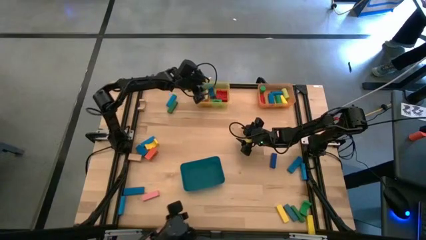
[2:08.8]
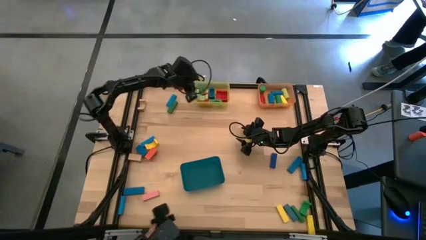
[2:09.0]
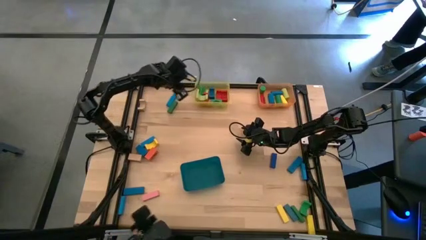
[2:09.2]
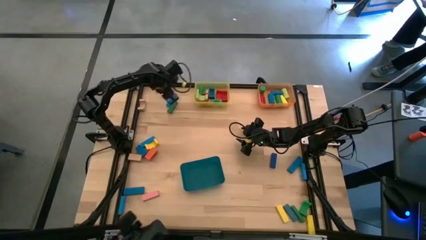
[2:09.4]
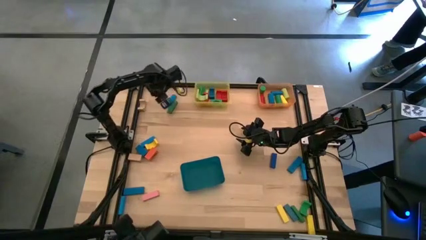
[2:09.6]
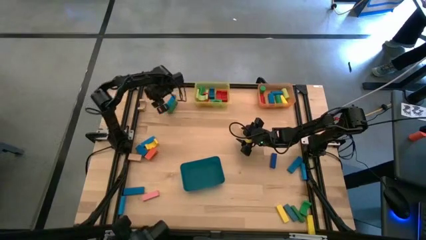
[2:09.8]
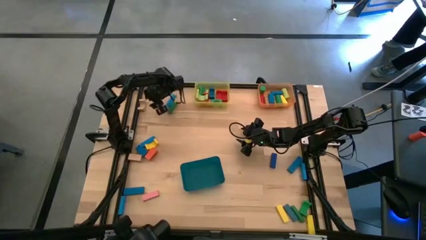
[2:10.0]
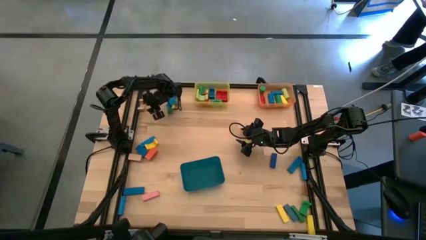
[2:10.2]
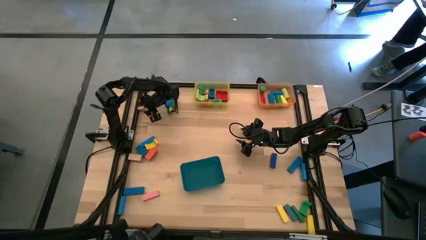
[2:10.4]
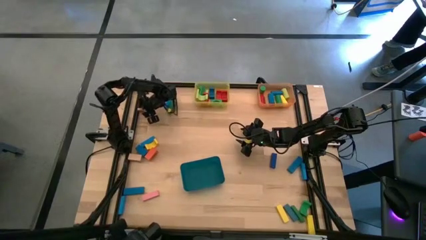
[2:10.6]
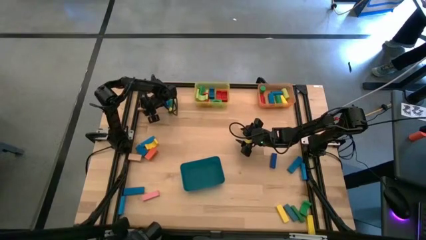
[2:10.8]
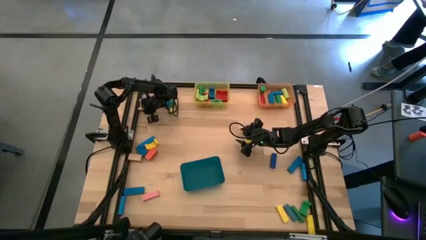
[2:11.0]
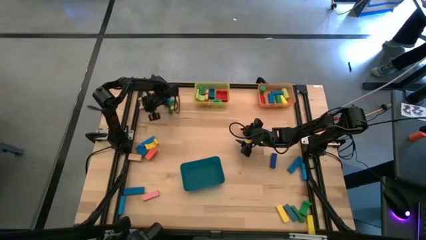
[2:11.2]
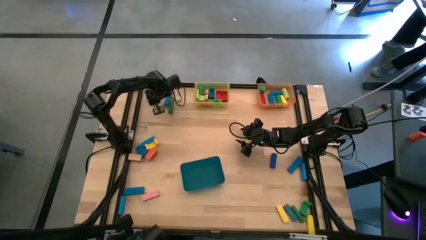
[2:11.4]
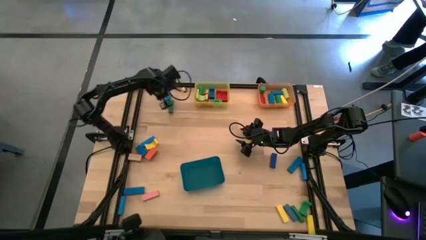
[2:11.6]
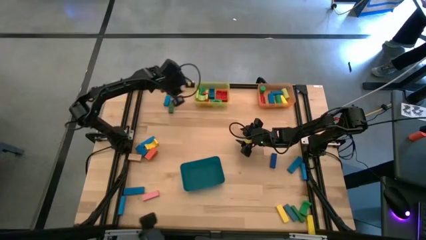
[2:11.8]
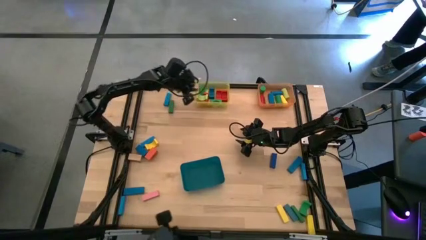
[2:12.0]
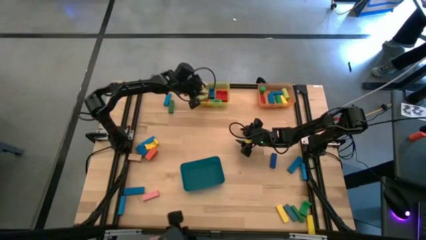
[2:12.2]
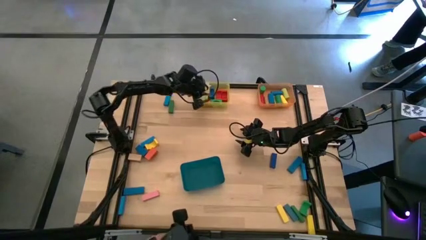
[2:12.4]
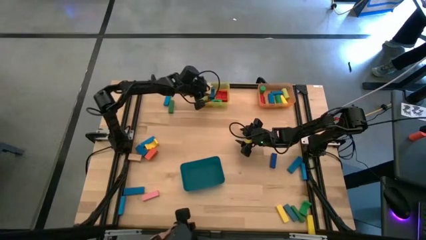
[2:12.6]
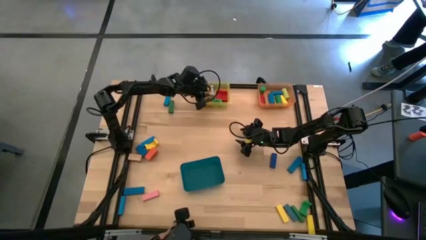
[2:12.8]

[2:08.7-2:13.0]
Task: Sort blocks by size
Put the brown arch block into the yellow bin

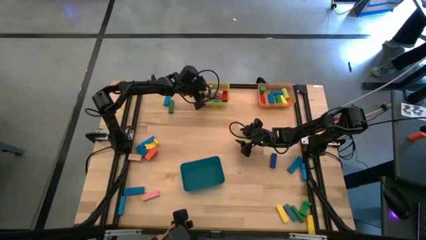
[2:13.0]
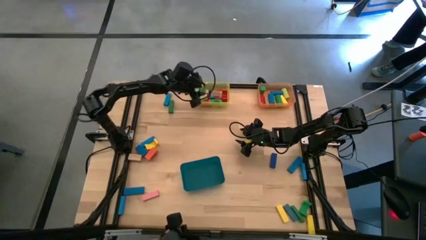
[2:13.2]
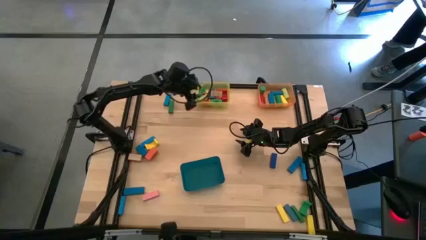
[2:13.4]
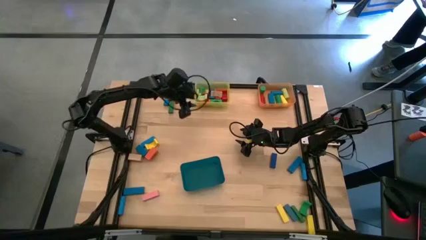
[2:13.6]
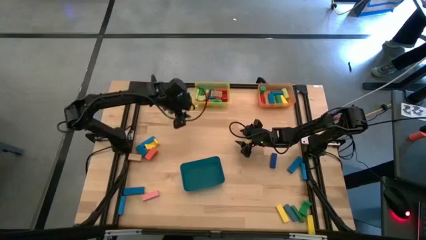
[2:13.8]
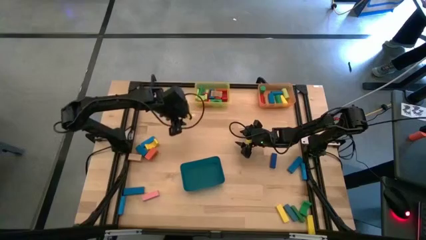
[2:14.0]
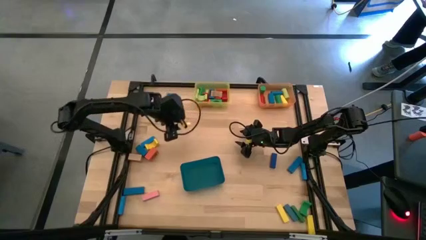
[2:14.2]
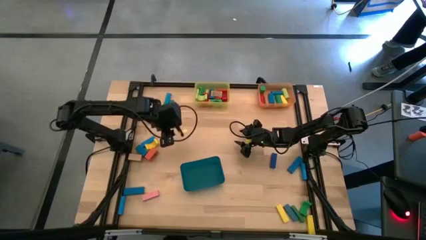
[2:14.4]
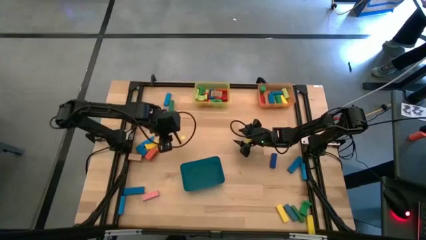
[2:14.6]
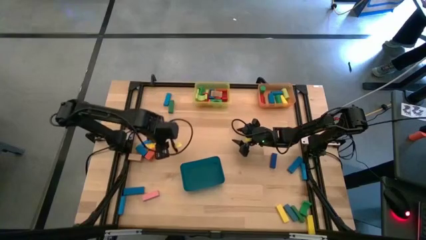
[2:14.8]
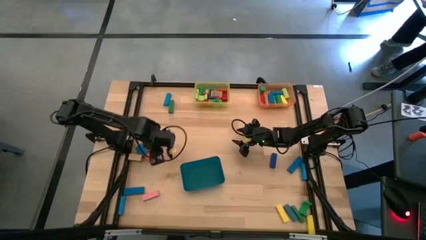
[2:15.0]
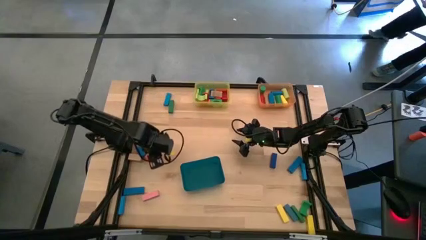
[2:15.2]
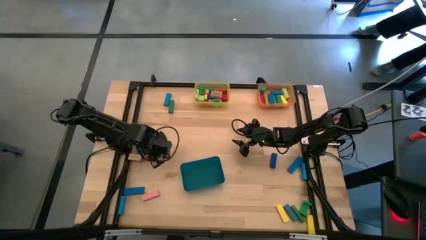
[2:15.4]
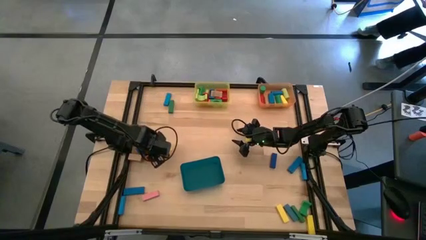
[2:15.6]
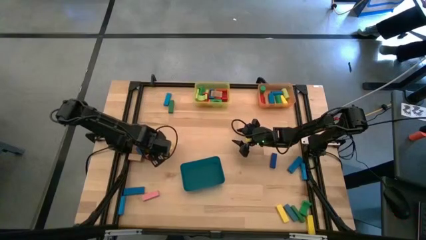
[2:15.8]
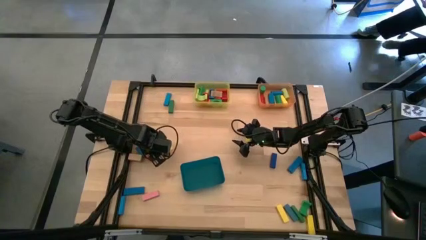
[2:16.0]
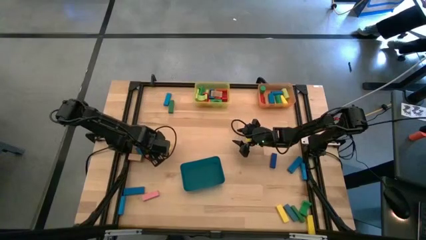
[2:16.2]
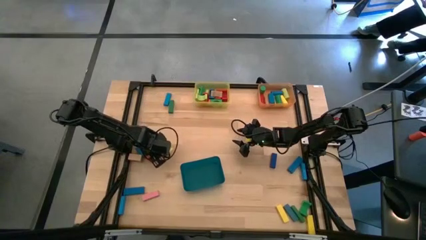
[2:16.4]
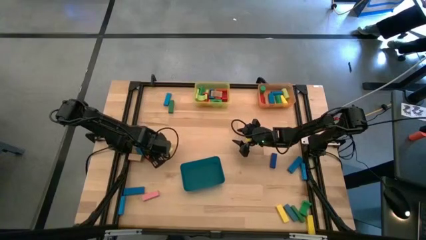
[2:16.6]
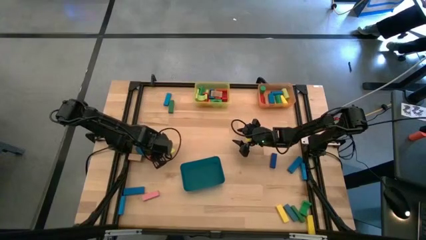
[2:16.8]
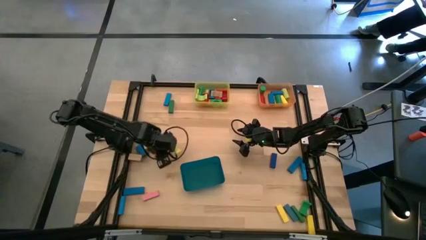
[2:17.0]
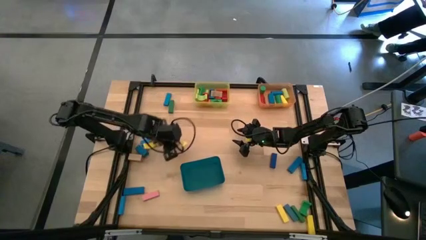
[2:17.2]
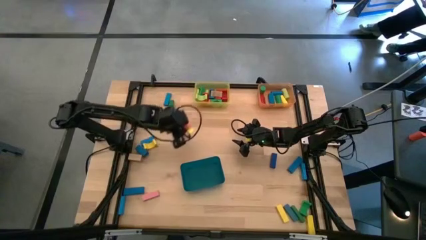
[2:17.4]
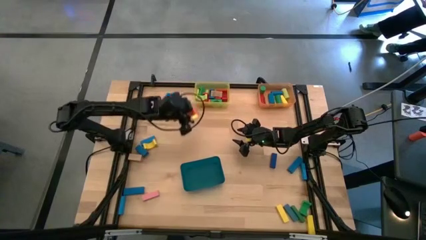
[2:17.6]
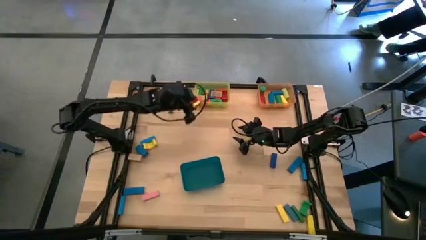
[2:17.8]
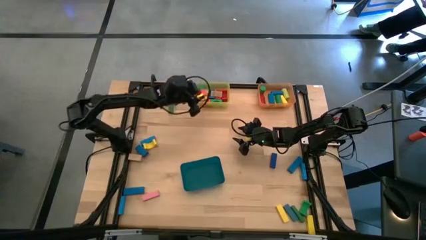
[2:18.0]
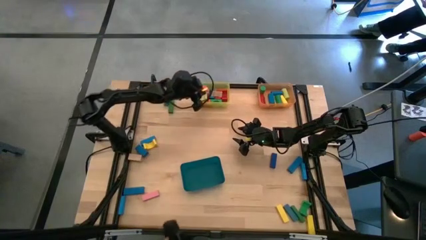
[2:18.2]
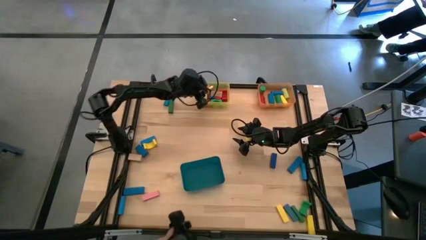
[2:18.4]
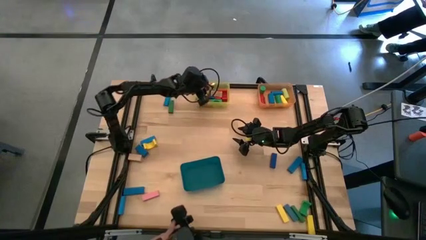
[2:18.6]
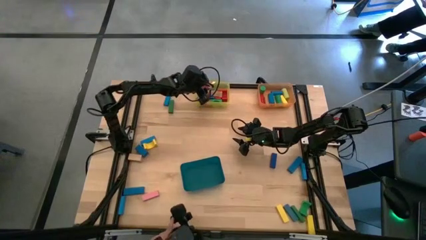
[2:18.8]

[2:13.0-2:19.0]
Put the pink arch block into the yellow bin

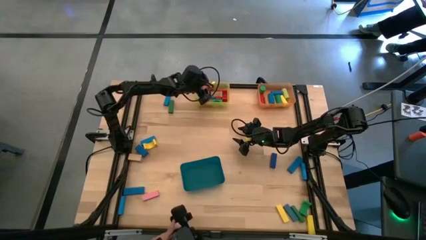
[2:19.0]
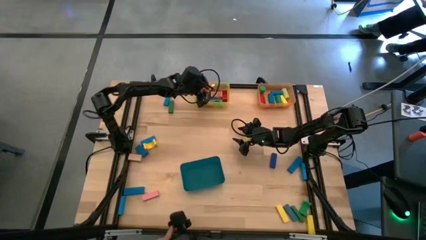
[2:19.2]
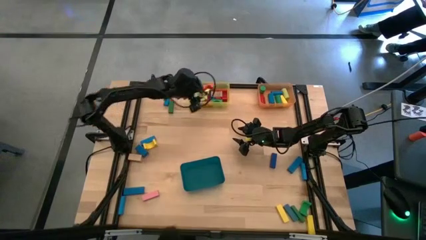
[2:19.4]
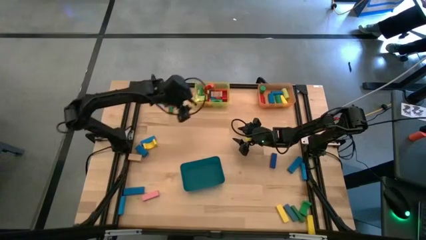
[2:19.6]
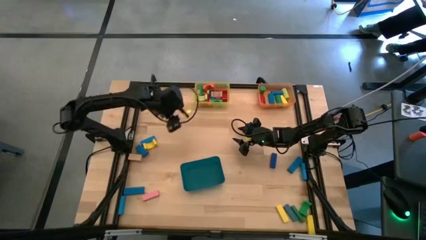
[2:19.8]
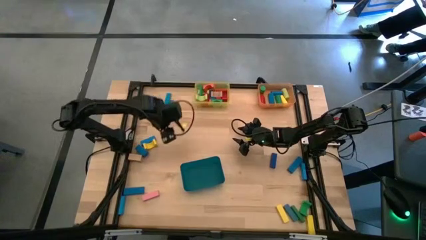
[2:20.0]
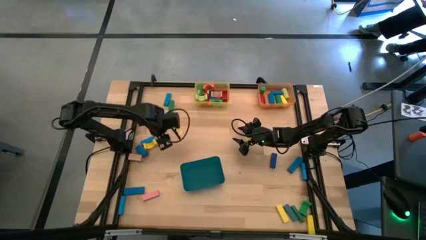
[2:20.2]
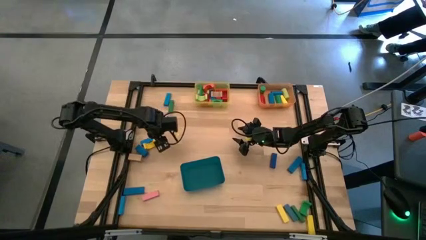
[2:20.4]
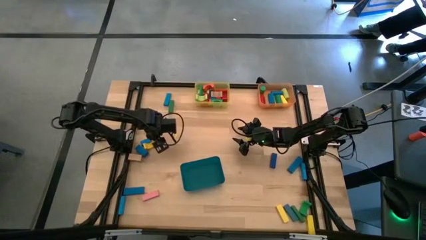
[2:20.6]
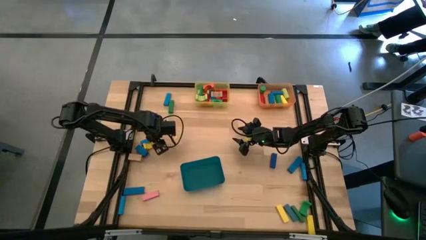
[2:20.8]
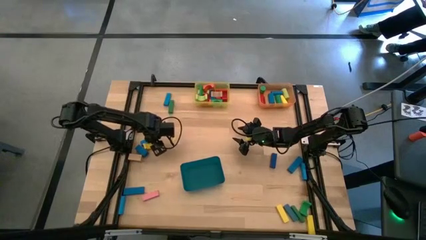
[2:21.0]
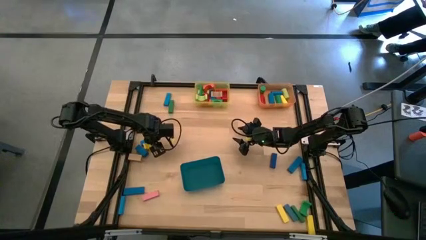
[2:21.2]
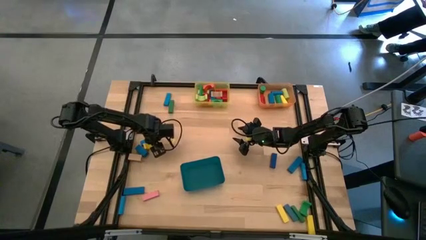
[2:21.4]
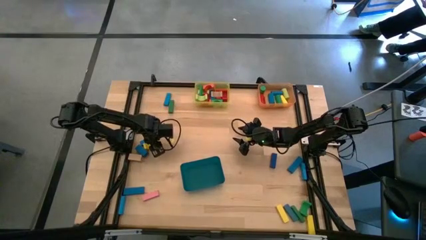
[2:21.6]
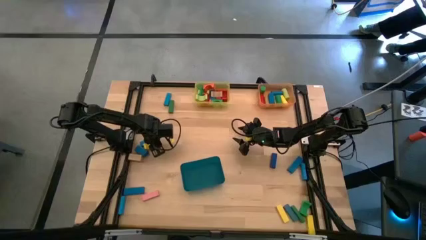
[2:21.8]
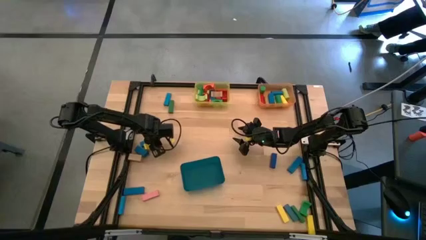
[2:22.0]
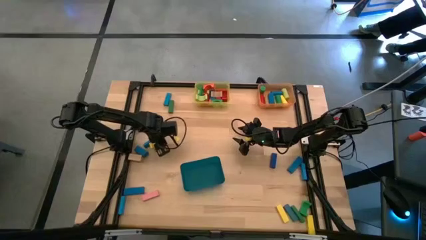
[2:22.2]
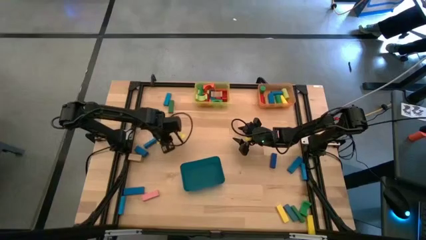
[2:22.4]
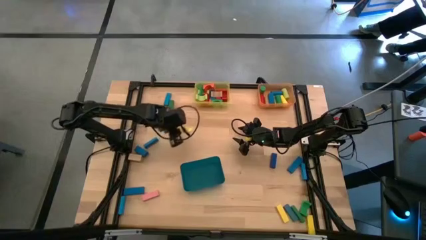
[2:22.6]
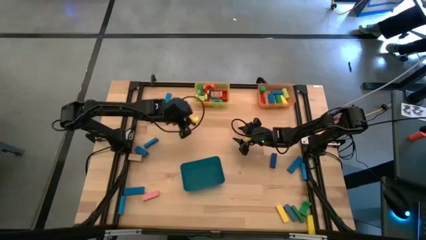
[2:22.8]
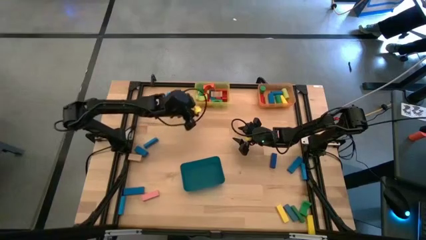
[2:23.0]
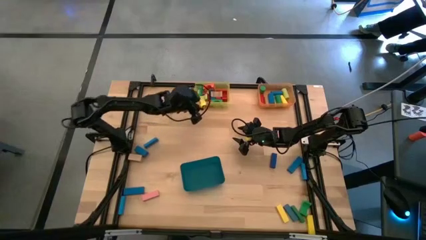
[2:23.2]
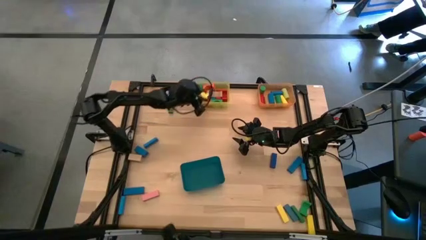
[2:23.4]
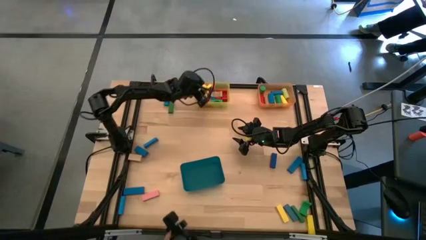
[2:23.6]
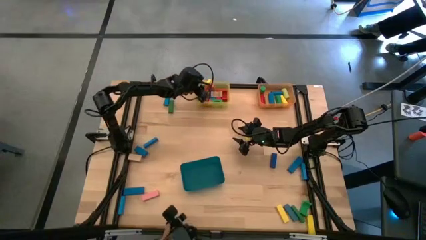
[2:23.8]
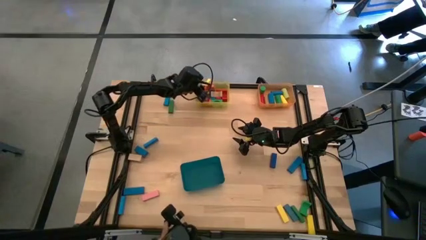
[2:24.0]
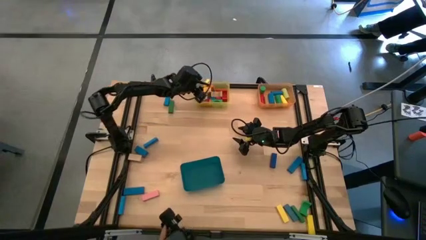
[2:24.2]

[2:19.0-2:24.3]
Put the yellow arch block into the yellow bin
